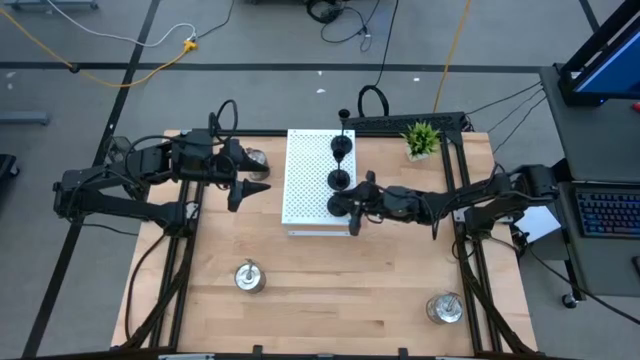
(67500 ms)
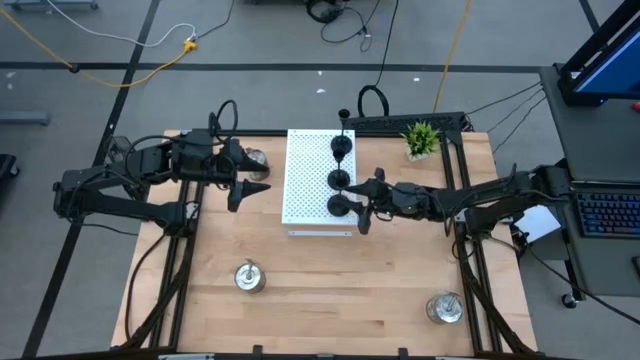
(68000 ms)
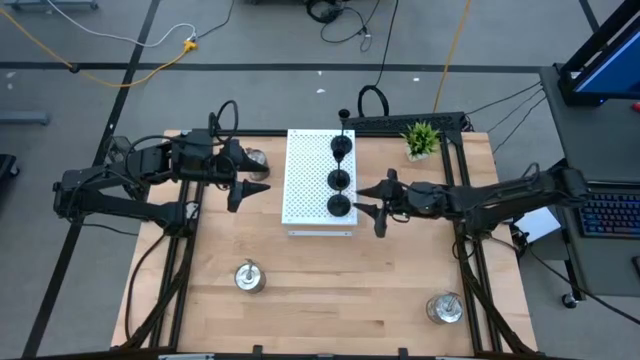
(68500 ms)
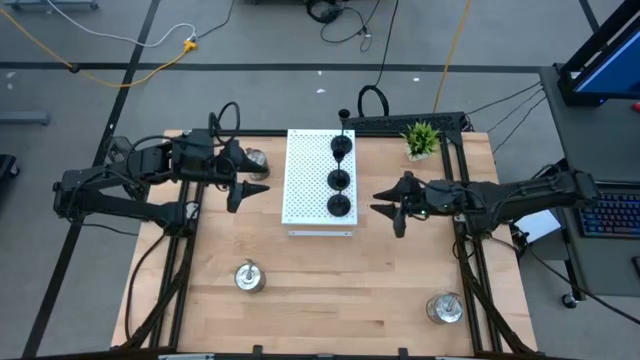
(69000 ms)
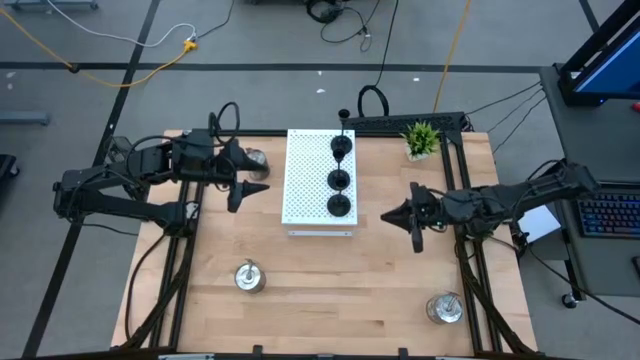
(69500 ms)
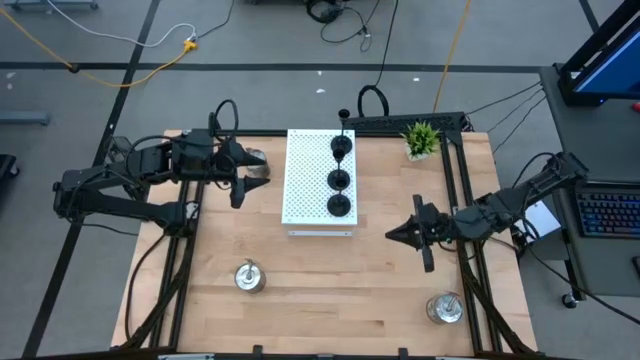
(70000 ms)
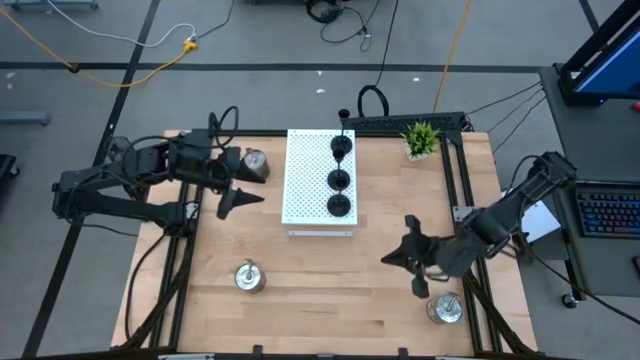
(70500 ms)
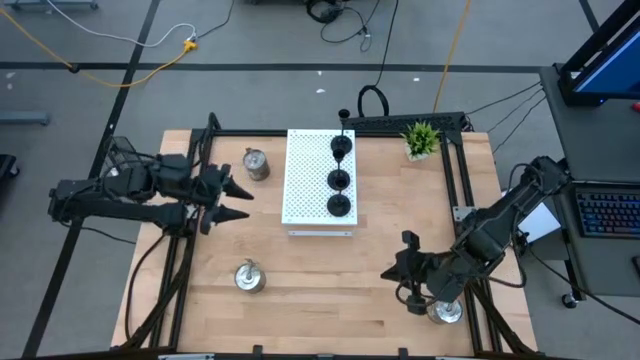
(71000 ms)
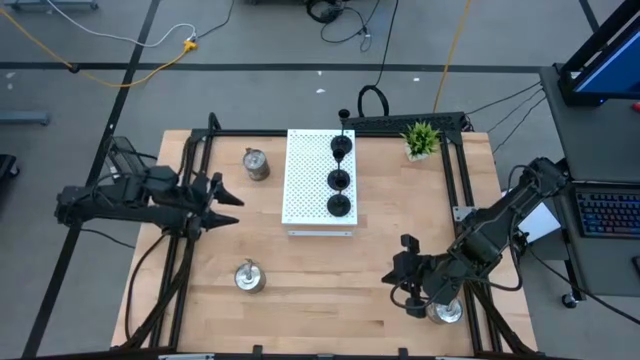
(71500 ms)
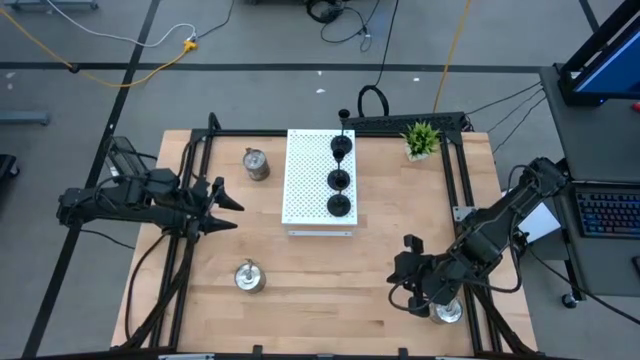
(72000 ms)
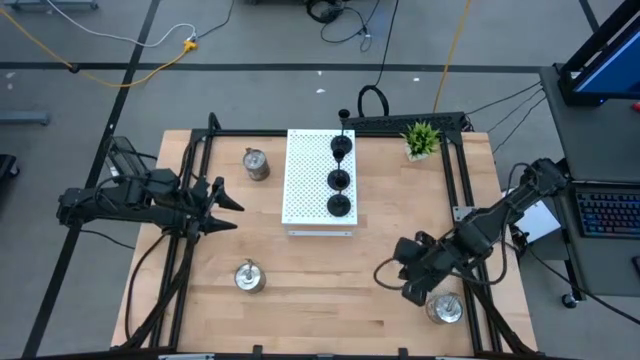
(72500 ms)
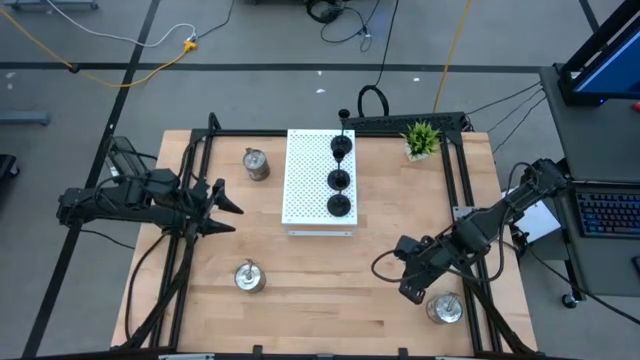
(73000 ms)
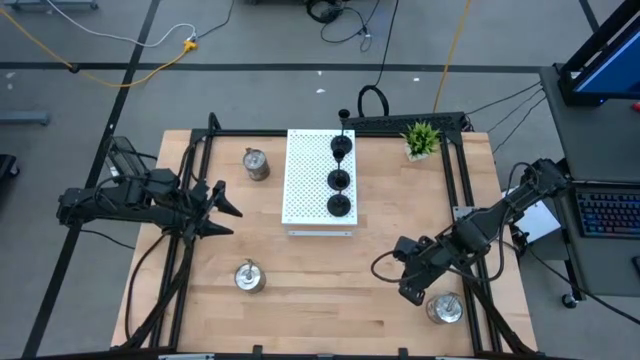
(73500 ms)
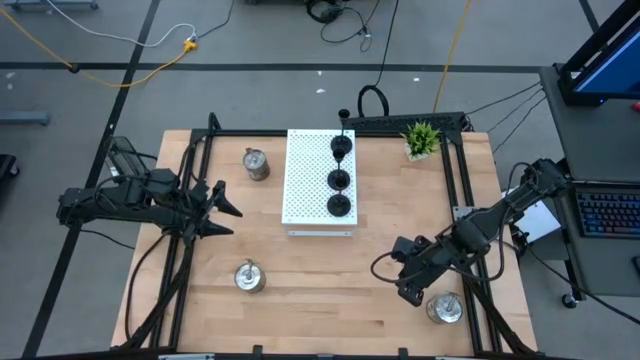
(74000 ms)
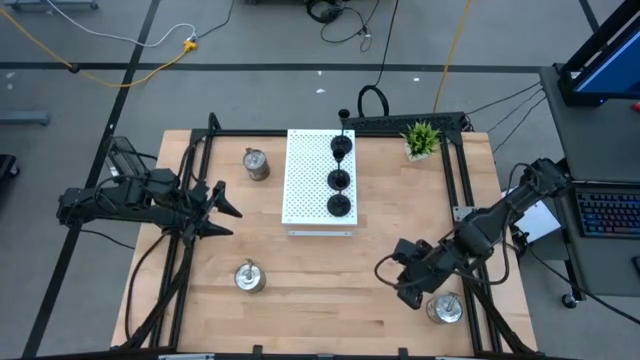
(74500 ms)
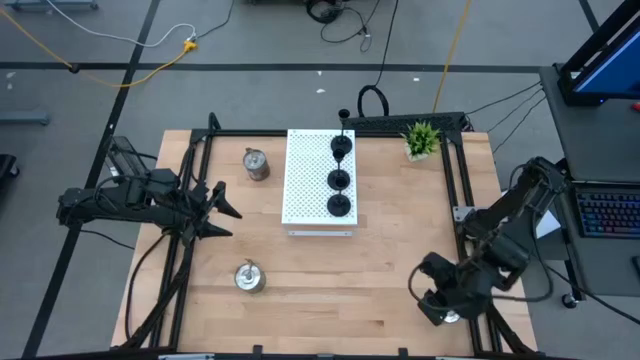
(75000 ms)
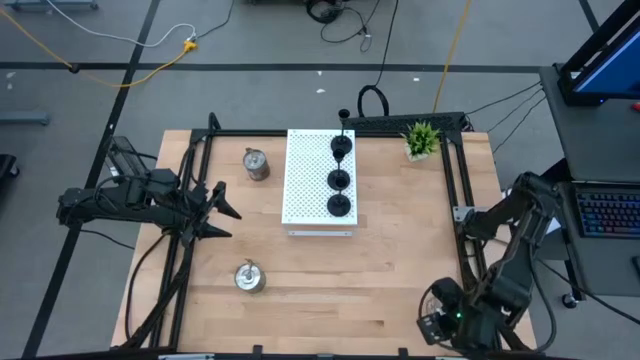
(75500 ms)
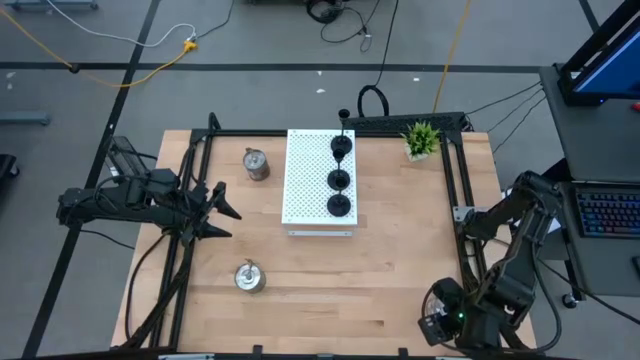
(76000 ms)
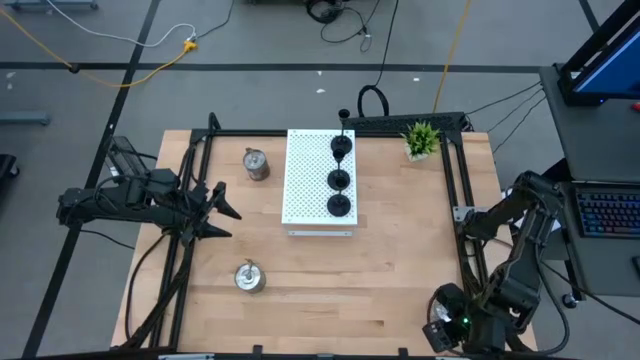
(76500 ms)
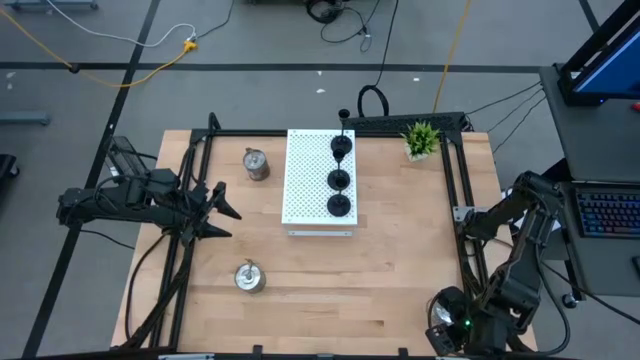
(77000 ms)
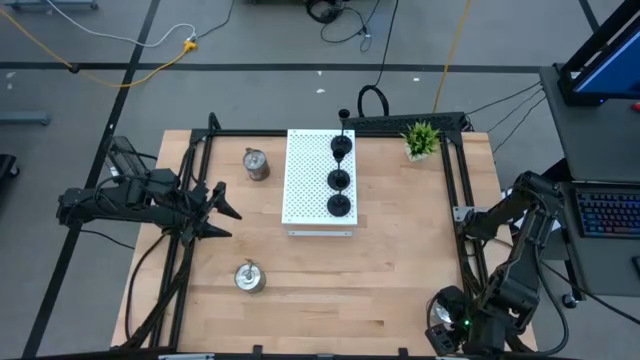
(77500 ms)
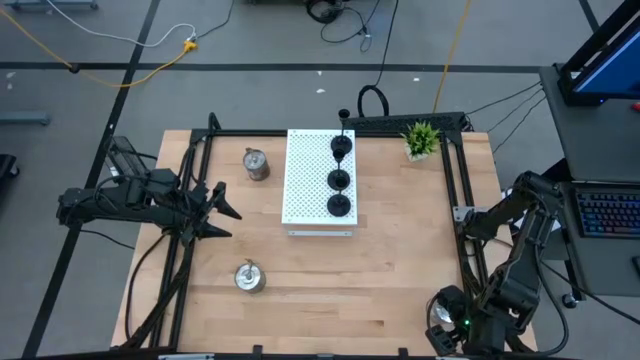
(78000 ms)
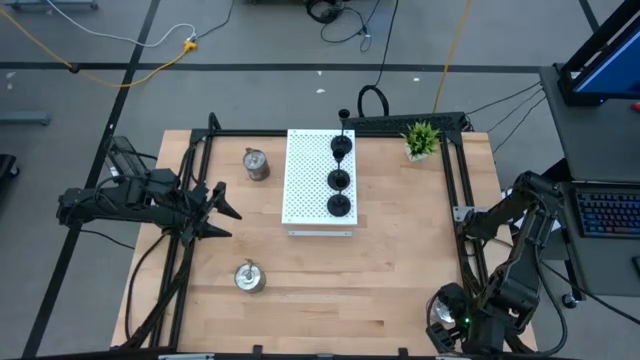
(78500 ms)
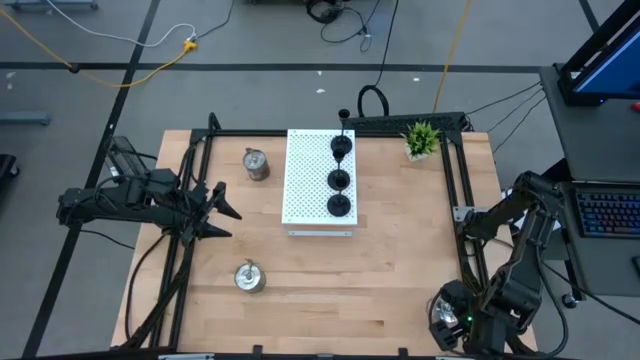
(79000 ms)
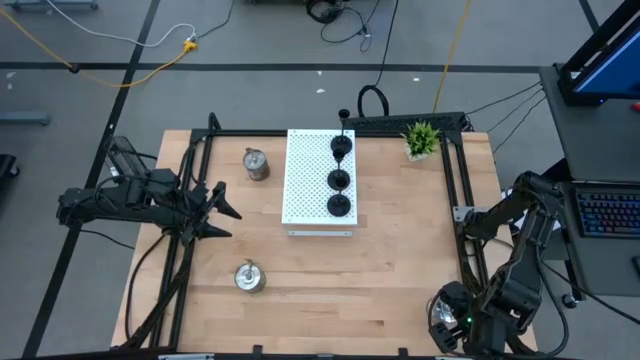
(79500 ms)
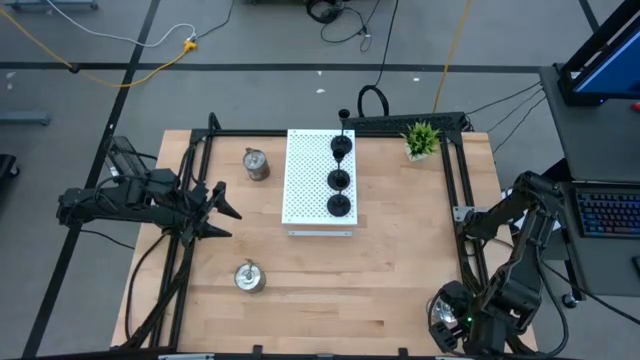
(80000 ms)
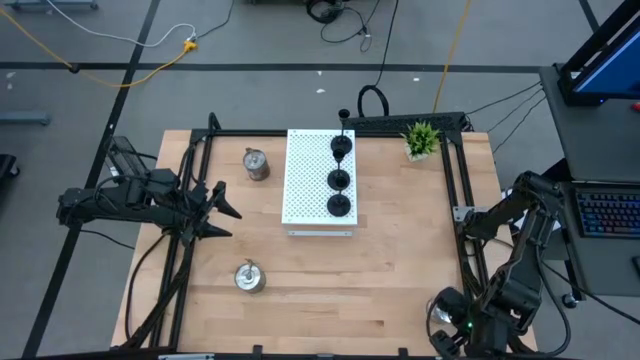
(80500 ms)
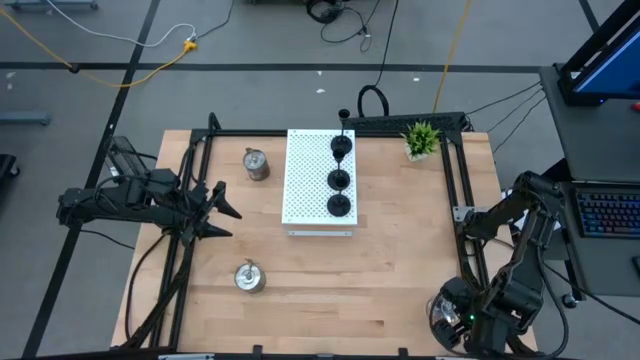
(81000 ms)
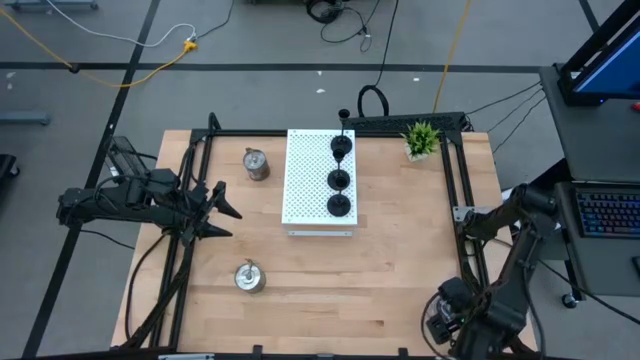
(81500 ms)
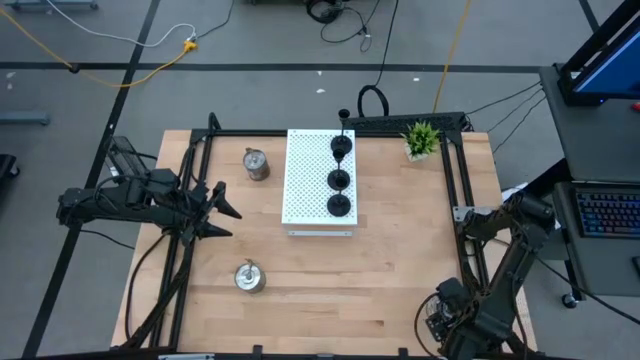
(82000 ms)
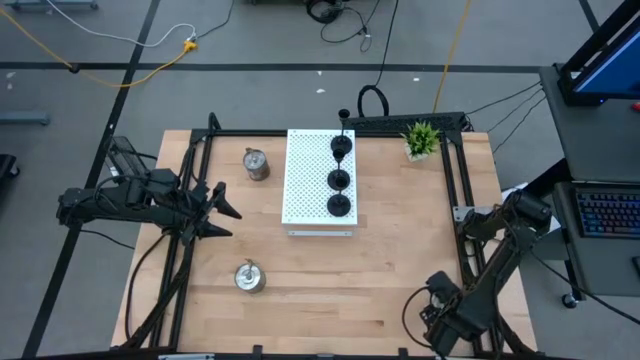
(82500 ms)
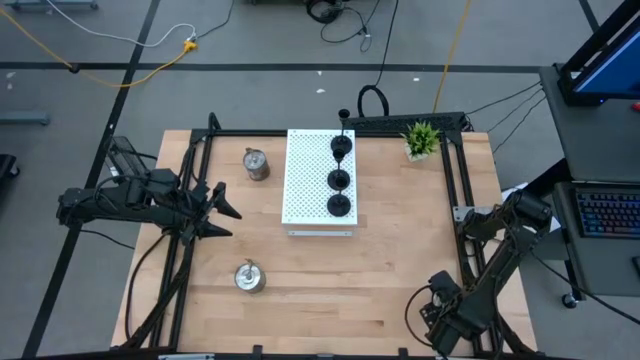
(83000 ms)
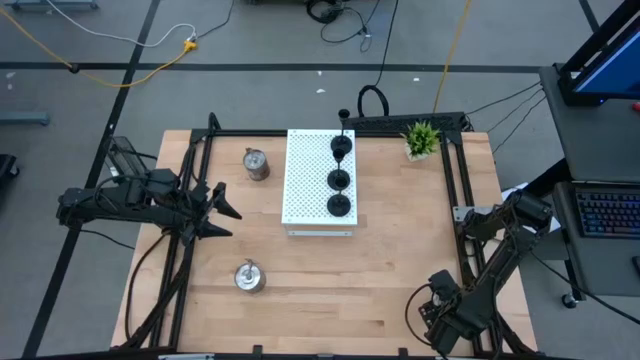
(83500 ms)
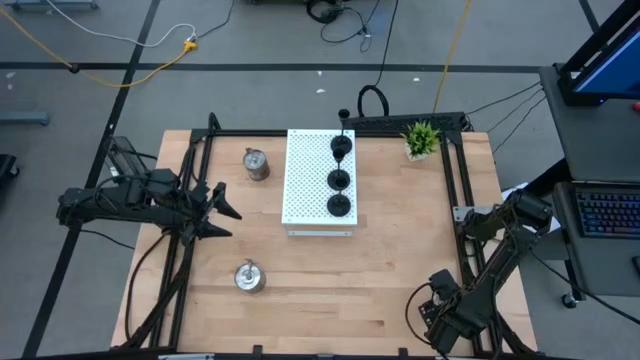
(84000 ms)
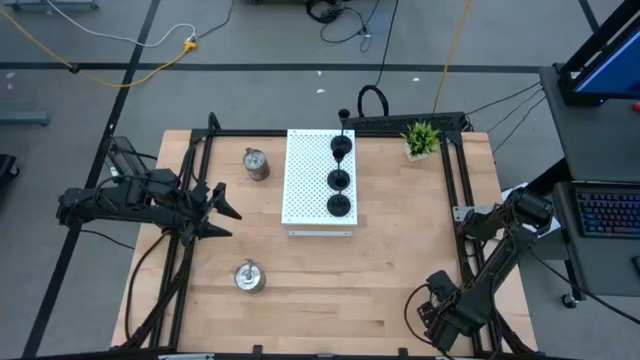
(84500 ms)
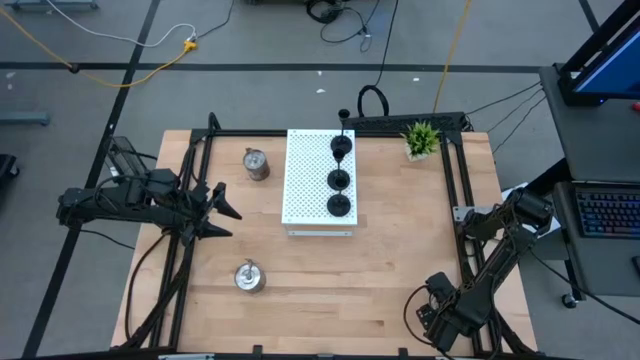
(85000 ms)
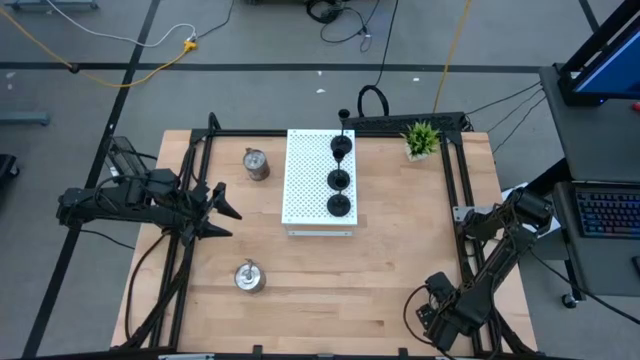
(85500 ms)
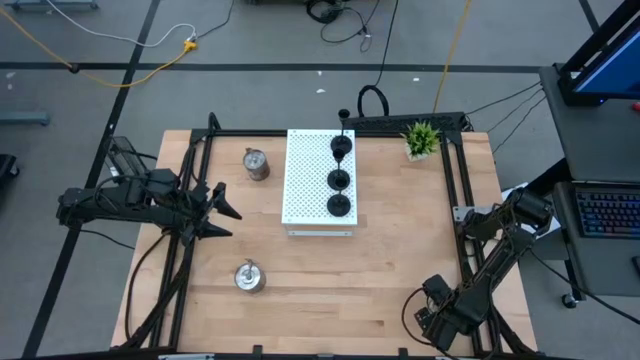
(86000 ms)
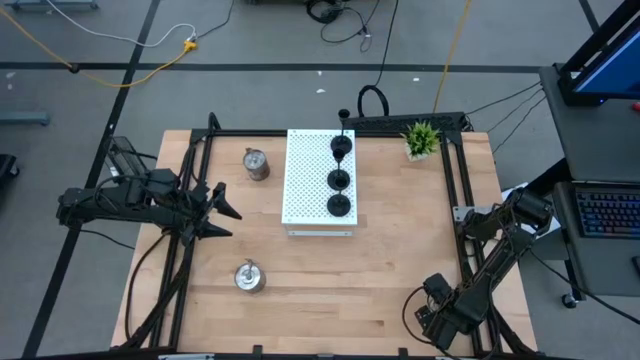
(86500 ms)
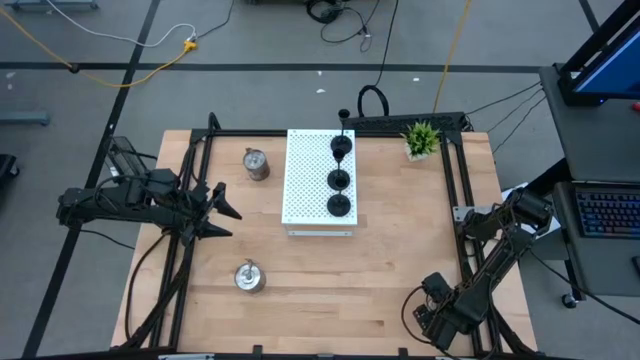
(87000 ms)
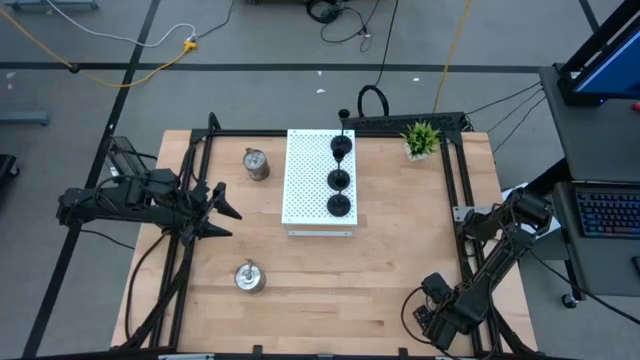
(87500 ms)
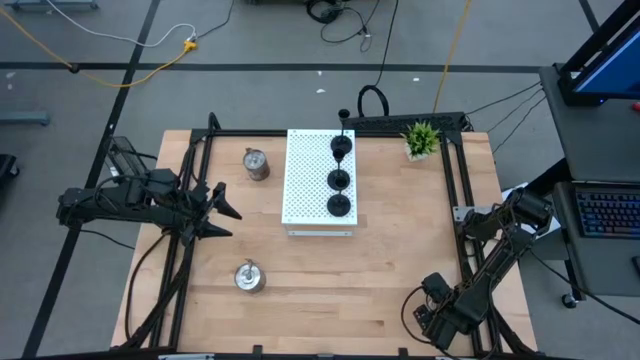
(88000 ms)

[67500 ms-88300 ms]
Task: Pick & Place candle stick holders
Put the bottom right brown scented candle on the shelf
